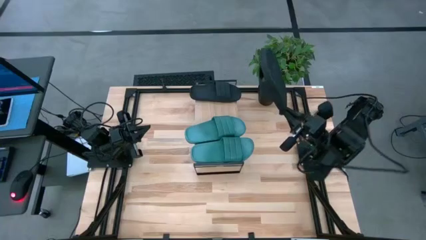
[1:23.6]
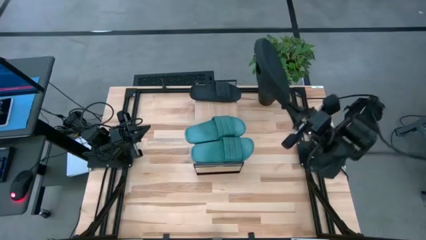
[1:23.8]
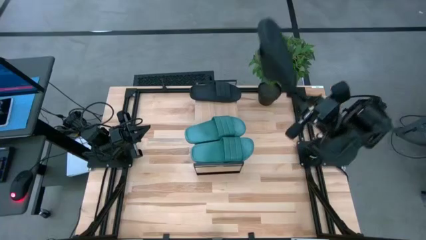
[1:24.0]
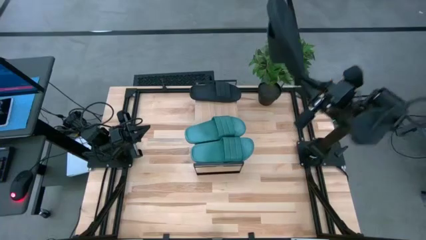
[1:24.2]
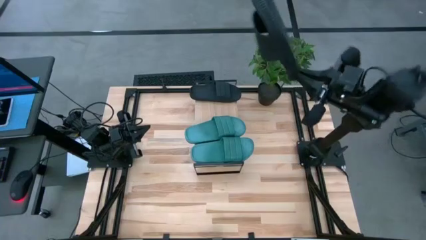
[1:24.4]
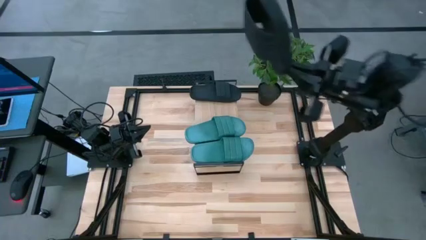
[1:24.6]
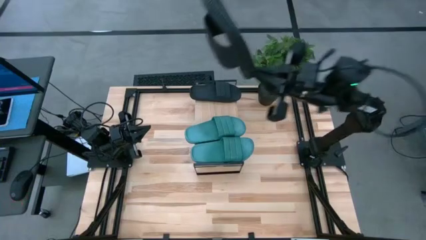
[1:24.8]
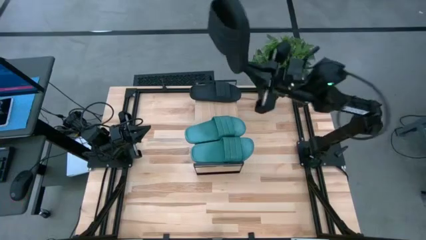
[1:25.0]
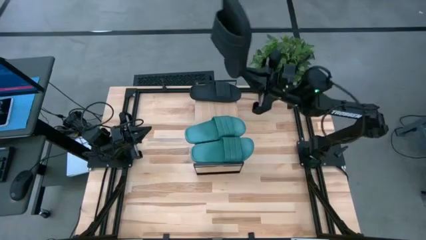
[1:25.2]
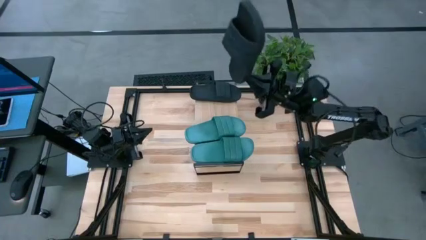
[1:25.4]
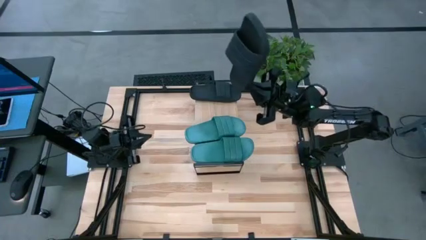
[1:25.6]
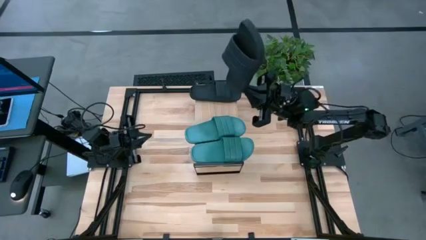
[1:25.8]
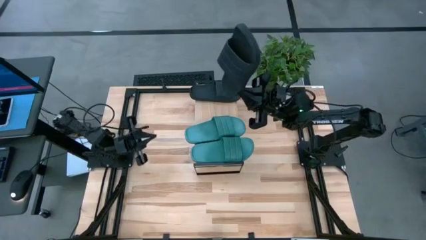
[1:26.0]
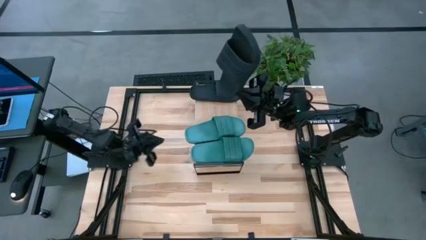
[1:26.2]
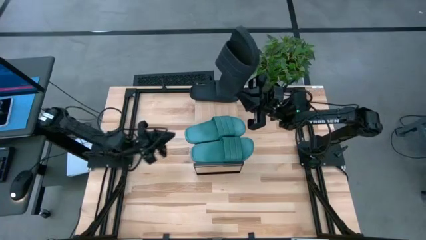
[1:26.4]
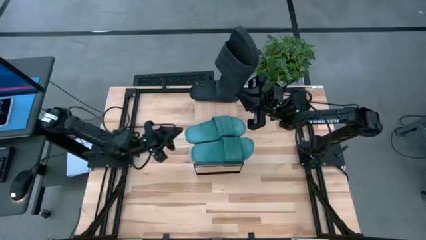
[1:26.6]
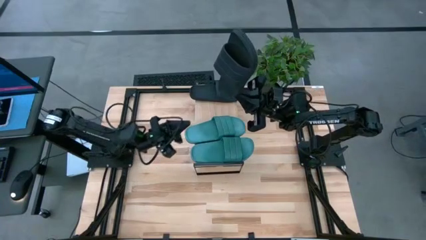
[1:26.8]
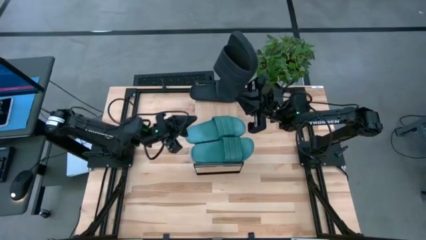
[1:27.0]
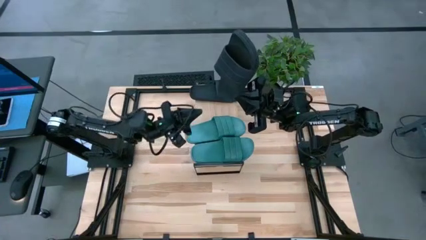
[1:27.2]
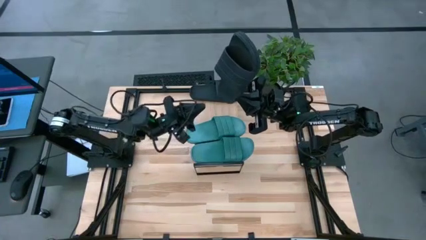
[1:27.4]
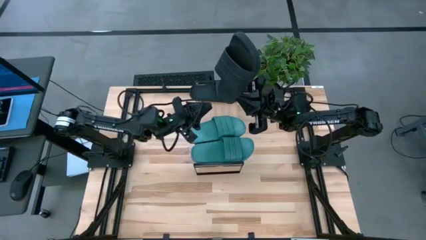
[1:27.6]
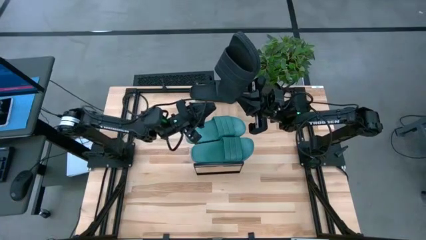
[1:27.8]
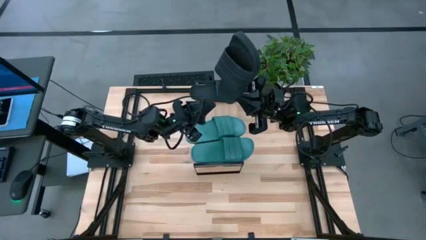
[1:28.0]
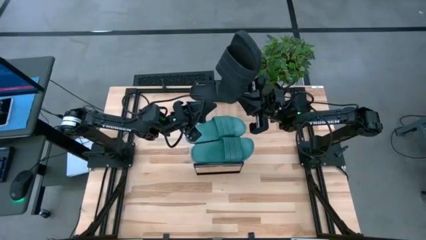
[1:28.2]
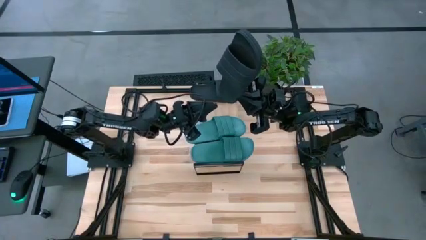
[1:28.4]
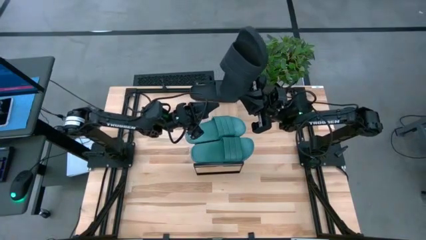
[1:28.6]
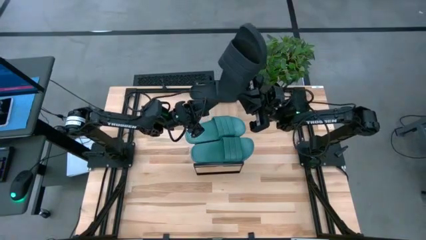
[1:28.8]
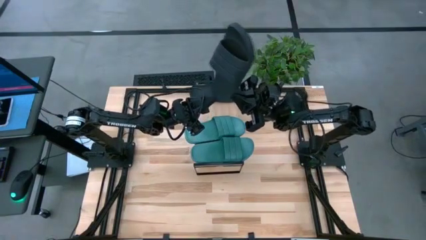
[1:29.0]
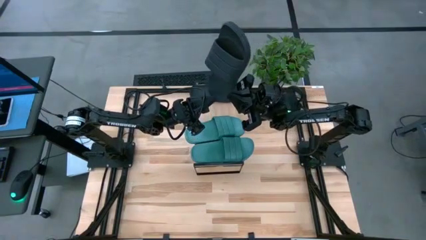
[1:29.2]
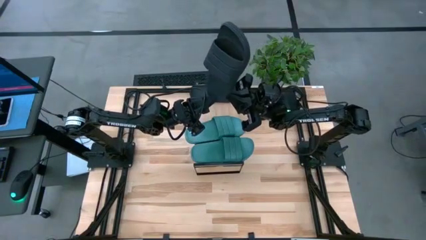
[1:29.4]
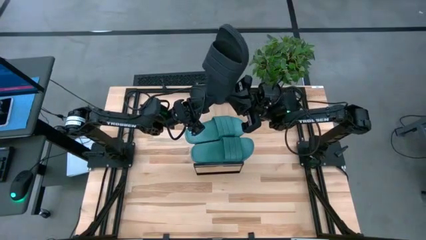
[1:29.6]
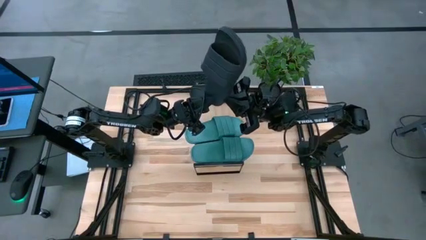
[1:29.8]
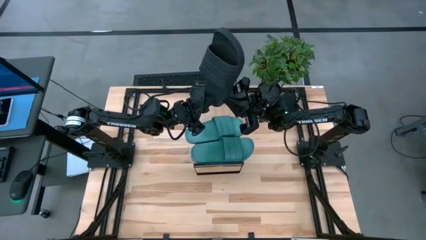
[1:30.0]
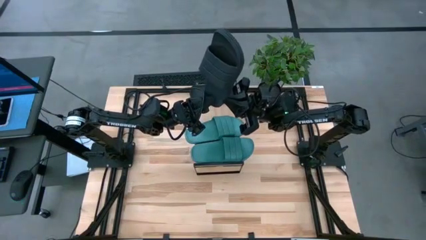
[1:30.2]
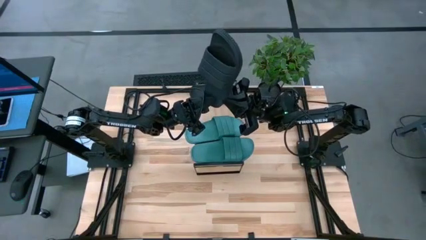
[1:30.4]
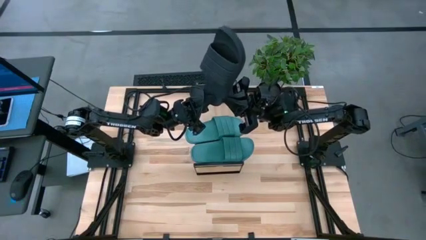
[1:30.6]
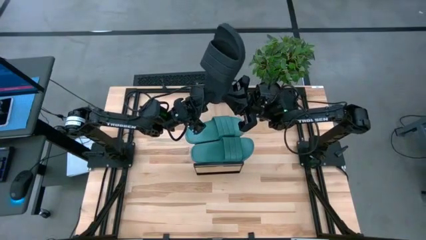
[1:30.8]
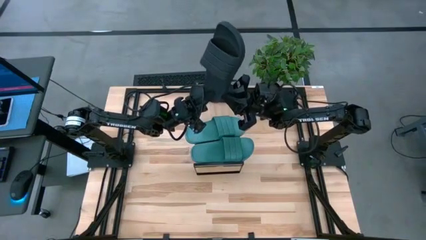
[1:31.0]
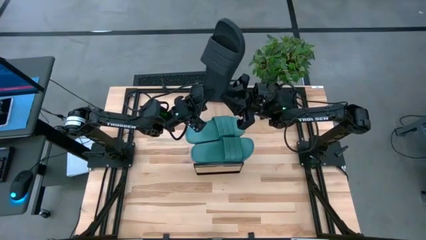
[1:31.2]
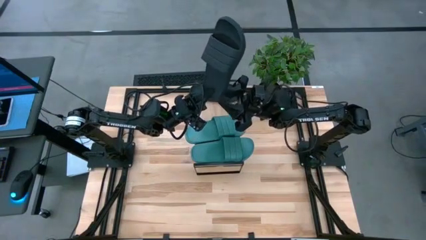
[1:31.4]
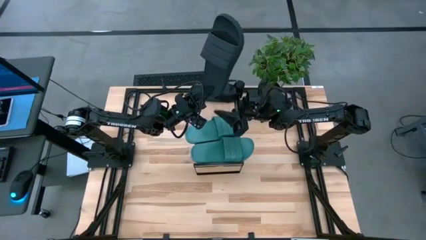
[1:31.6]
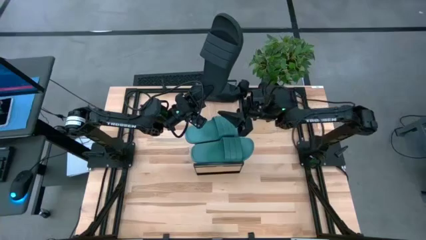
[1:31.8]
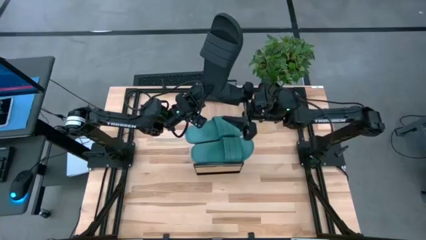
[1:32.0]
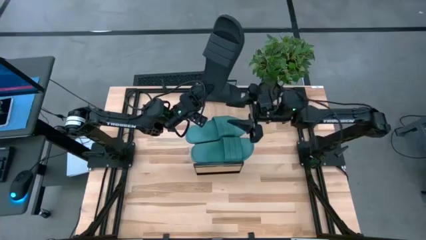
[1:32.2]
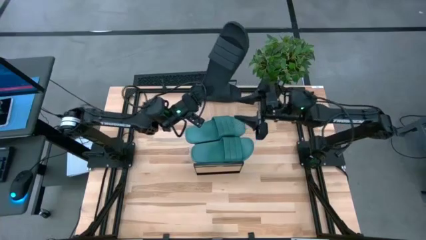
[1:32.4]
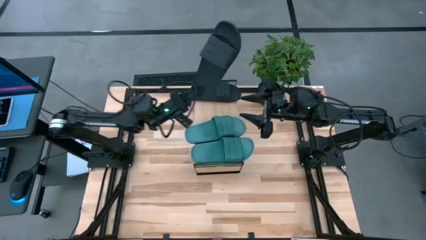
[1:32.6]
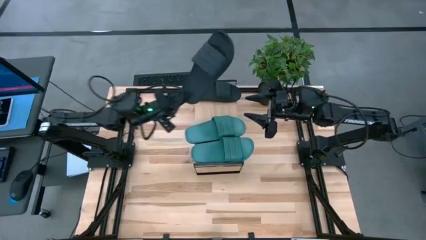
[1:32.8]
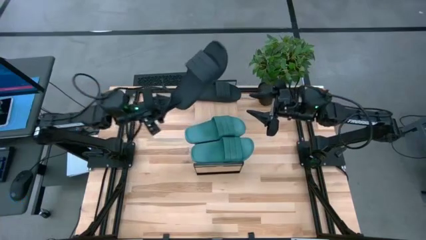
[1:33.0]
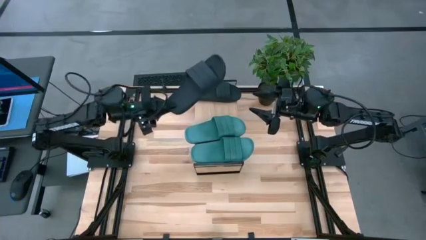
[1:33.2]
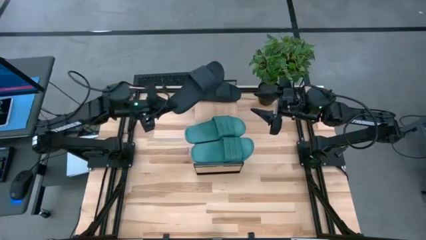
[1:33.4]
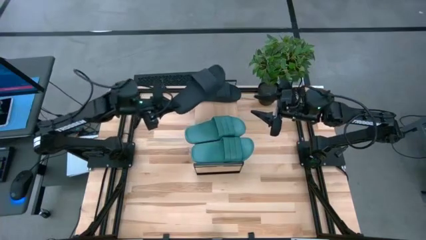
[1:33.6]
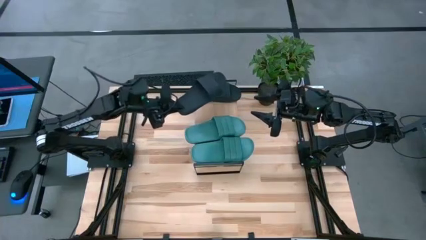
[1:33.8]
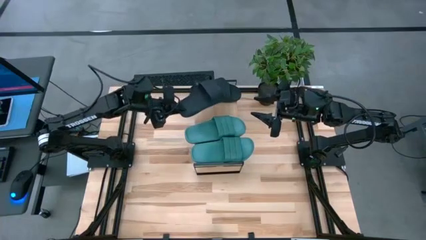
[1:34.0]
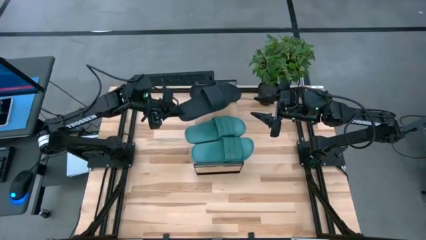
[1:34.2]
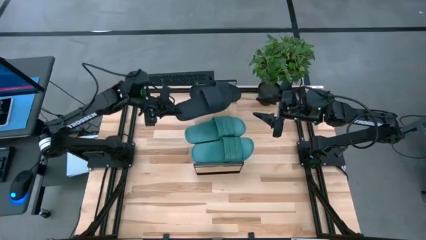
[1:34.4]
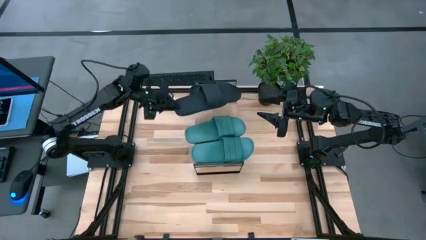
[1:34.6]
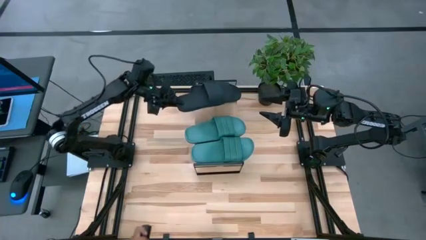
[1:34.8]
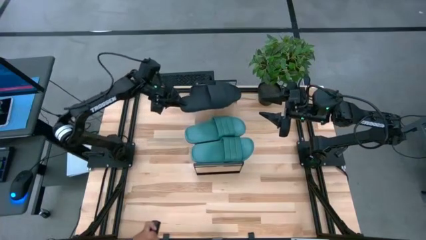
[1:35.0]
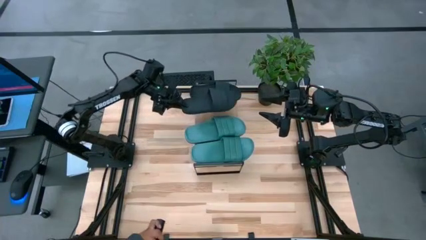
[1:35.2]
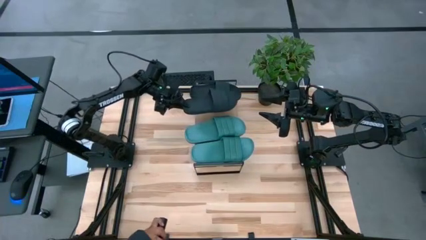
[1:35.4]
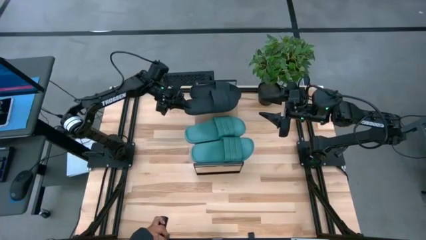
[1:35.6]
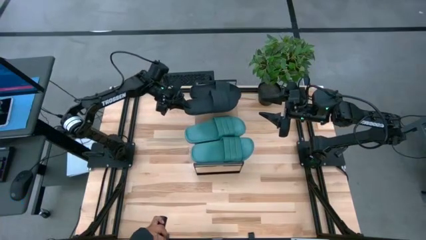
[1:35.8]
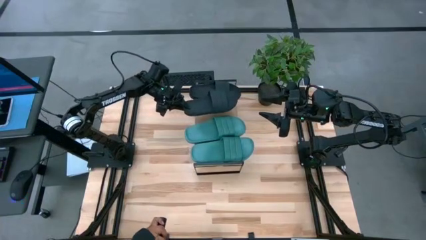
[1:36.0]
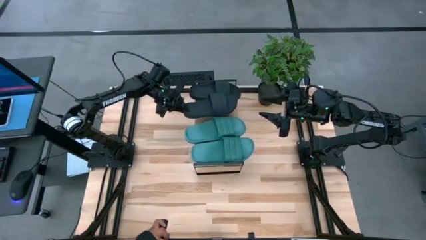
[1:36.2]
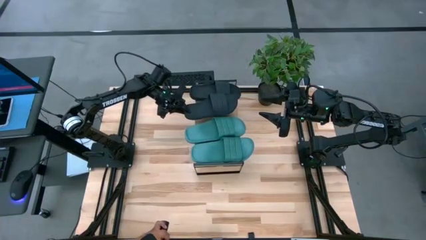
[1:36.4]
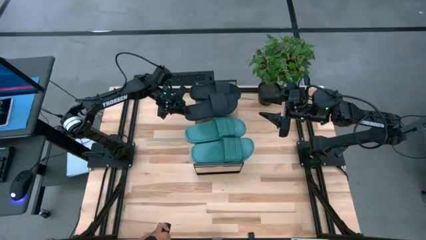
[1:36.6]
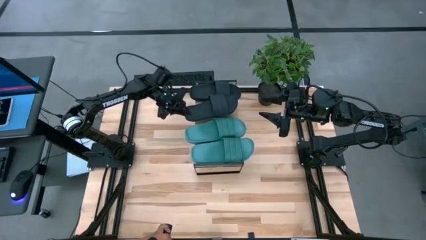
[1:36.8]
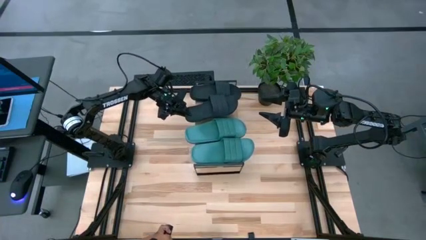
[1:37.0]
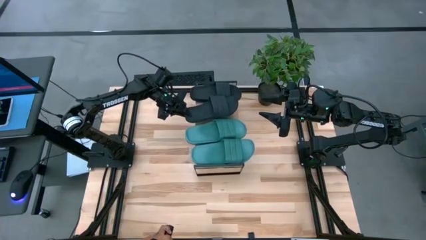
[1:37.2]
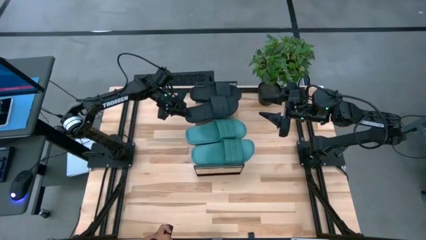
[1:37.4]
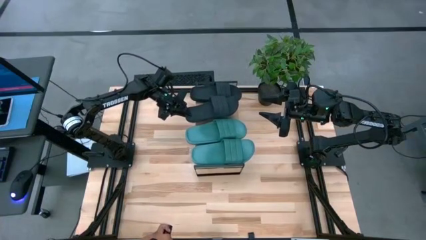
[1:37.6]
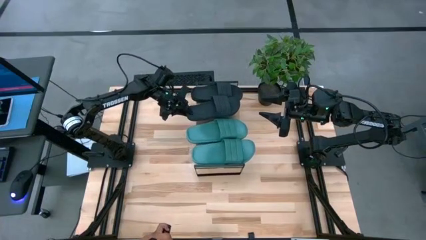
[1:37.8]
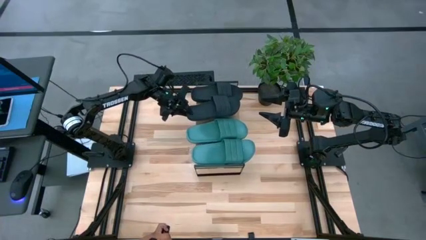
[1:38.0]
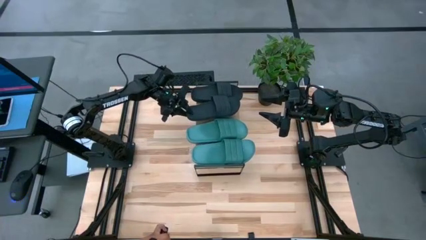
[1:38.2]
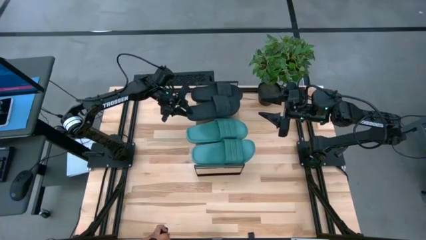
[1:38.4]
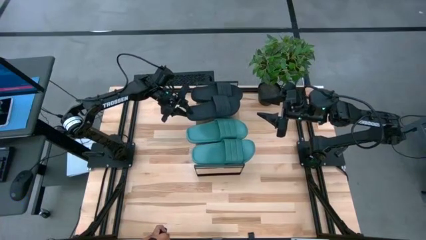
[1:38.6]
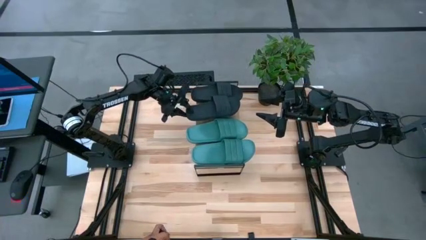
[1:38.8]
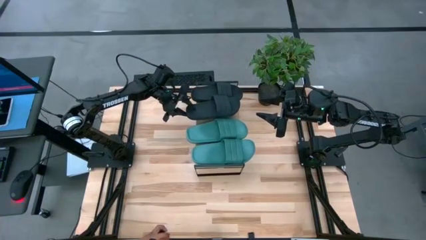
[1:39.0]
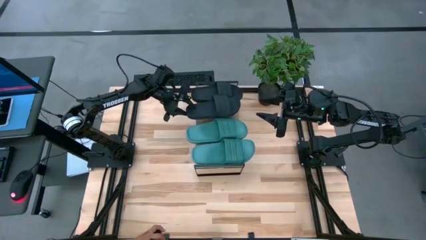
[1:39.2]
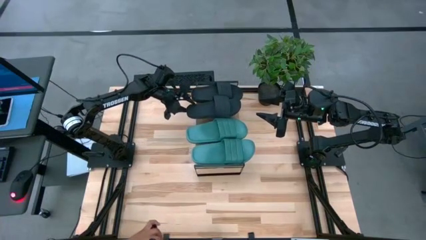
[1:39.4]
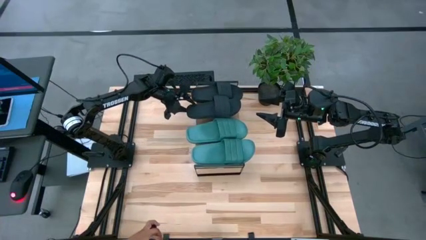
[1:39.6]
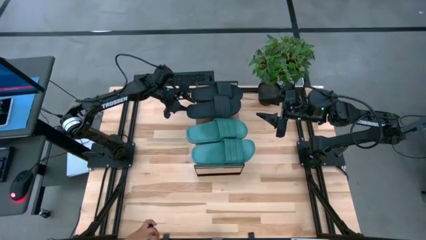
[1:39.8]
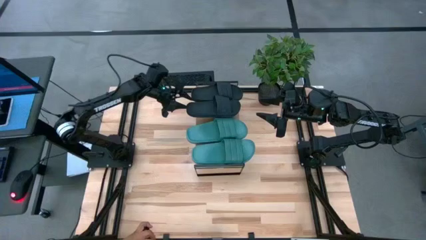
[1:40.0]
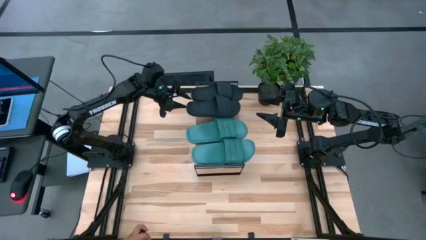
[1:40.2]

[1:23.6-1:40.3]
Task: Pick and place slides into the shelf
Put the black slipper on the shelf
